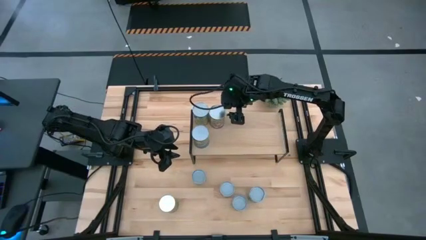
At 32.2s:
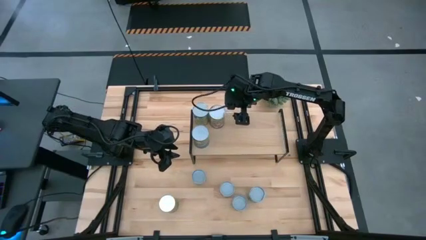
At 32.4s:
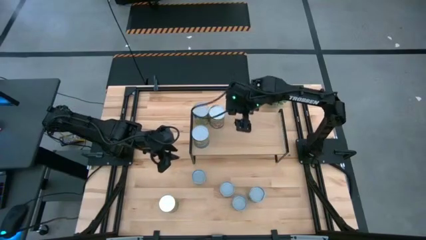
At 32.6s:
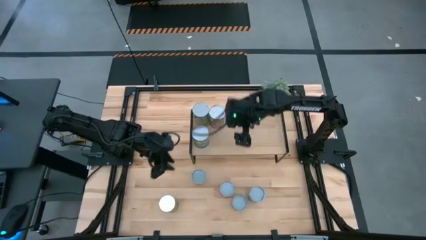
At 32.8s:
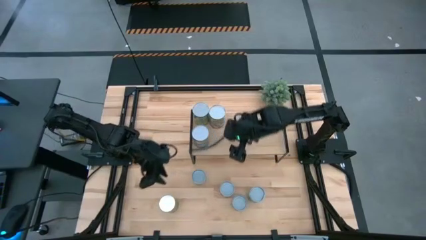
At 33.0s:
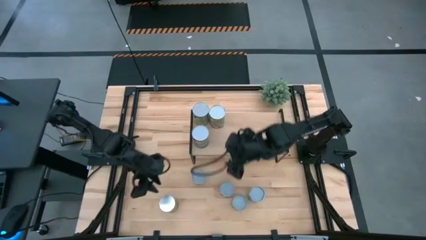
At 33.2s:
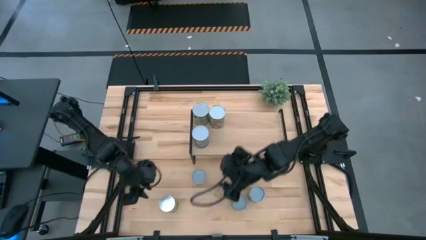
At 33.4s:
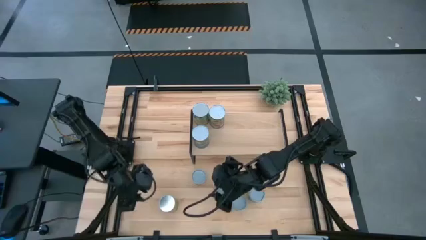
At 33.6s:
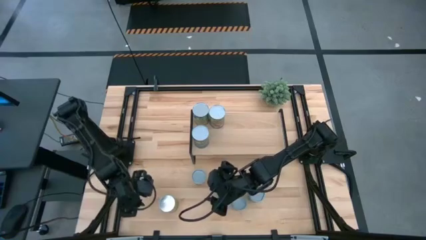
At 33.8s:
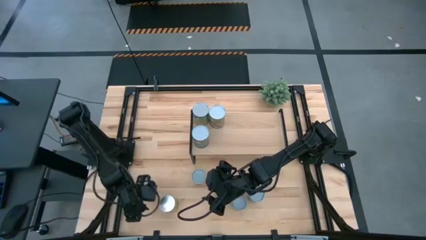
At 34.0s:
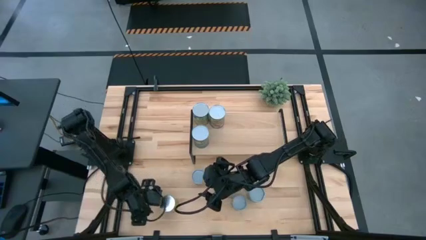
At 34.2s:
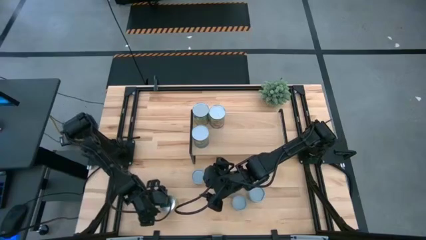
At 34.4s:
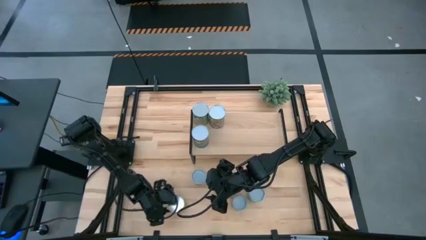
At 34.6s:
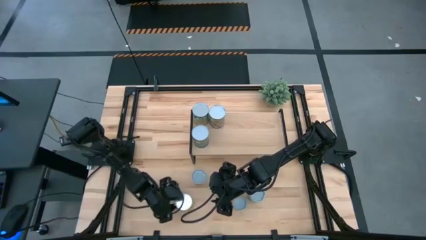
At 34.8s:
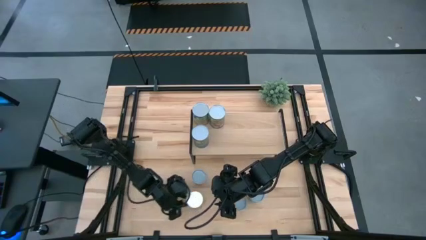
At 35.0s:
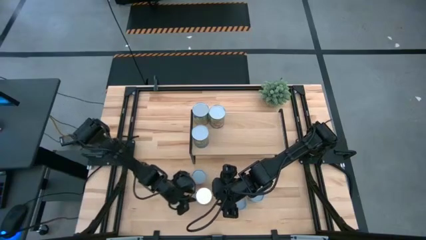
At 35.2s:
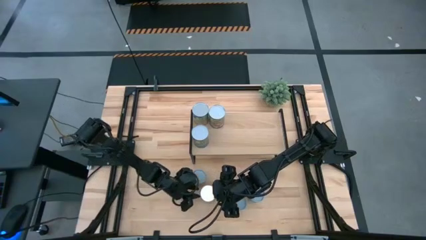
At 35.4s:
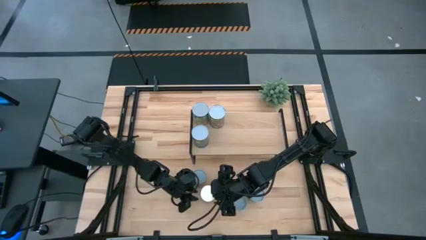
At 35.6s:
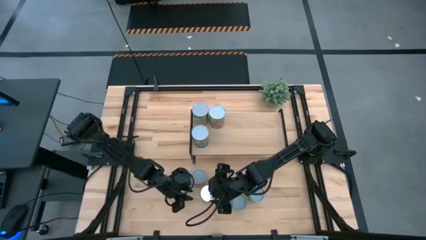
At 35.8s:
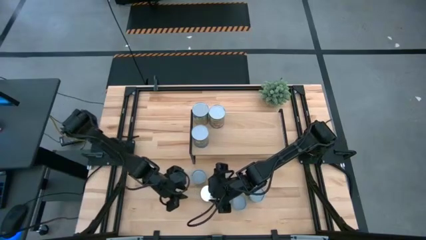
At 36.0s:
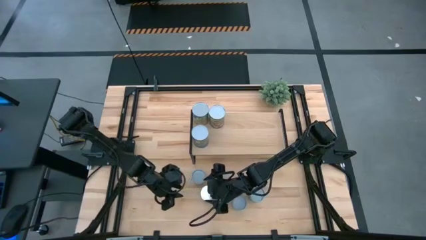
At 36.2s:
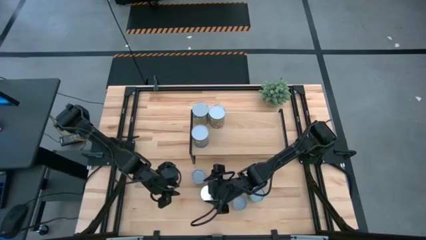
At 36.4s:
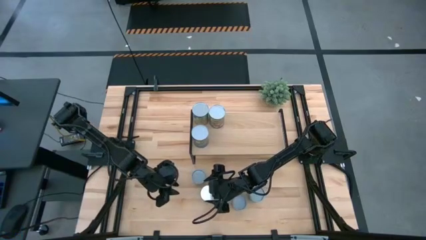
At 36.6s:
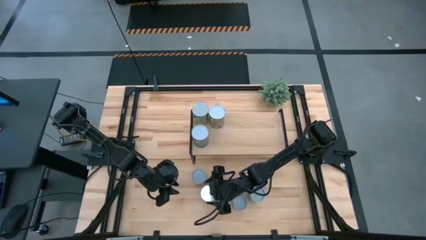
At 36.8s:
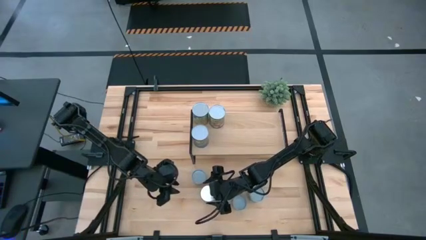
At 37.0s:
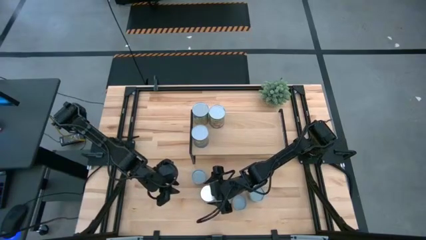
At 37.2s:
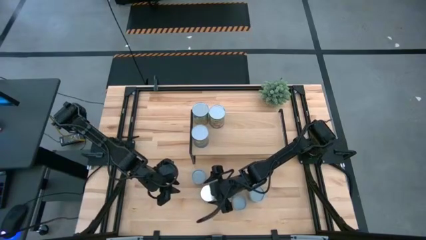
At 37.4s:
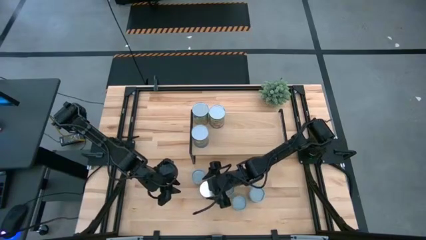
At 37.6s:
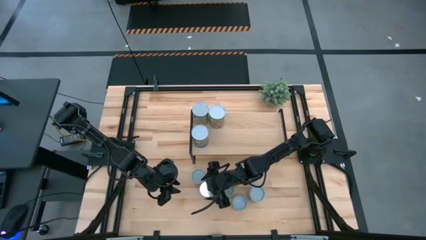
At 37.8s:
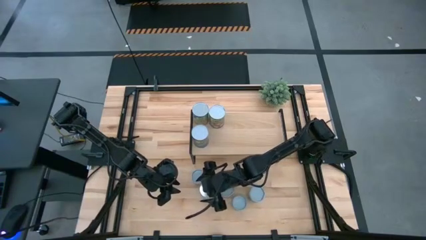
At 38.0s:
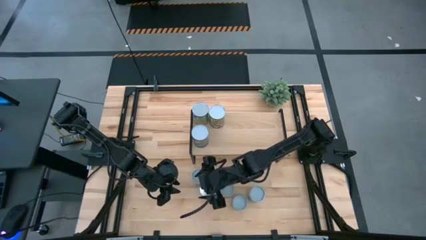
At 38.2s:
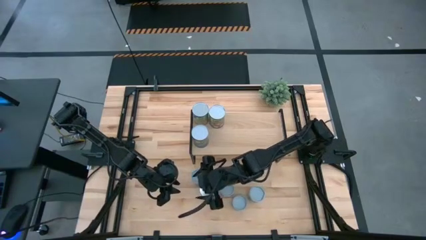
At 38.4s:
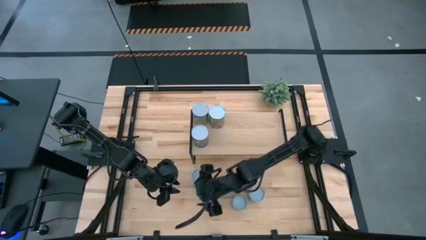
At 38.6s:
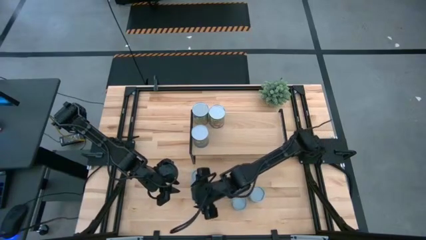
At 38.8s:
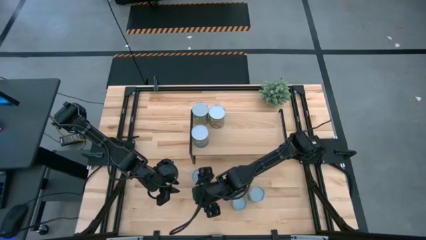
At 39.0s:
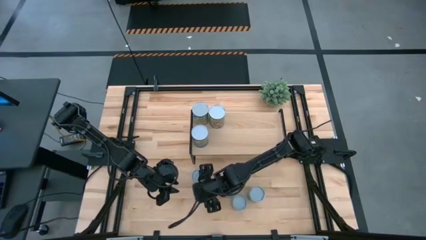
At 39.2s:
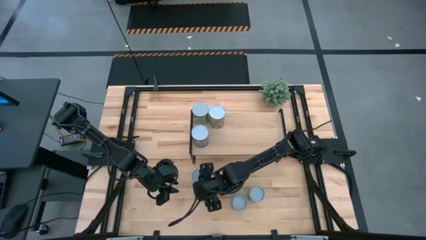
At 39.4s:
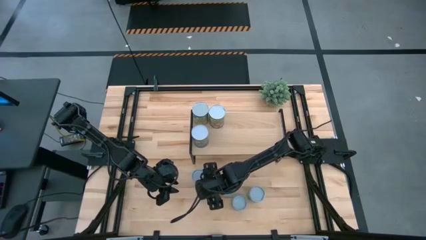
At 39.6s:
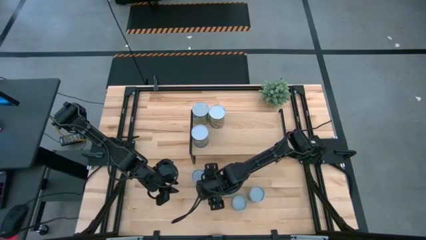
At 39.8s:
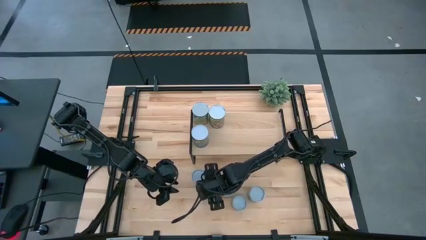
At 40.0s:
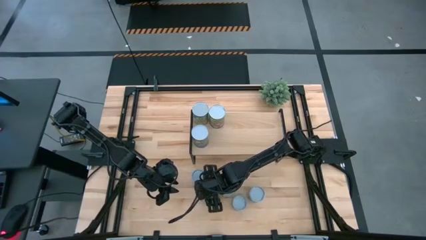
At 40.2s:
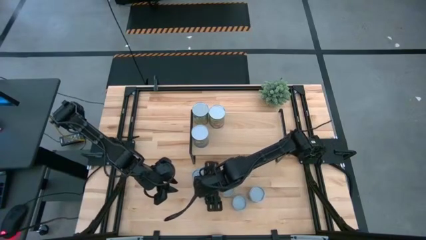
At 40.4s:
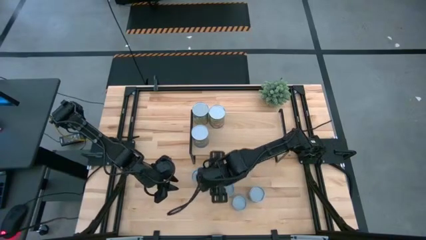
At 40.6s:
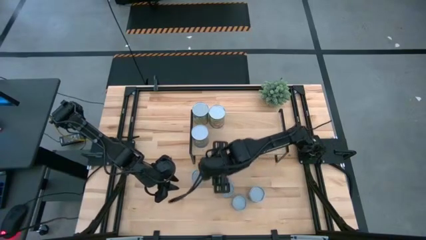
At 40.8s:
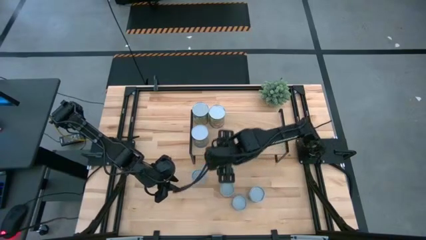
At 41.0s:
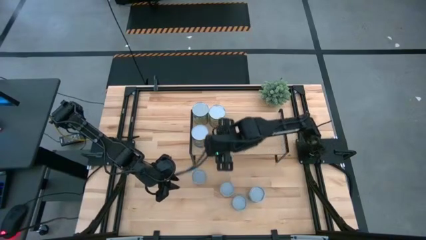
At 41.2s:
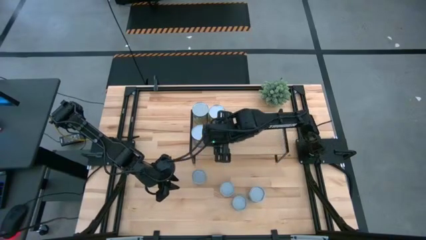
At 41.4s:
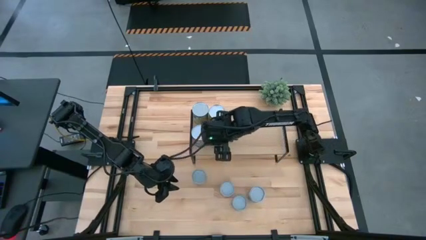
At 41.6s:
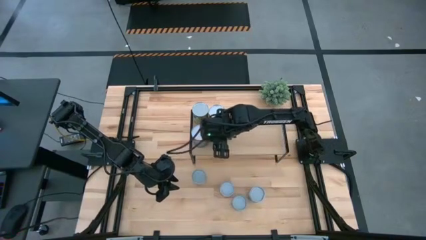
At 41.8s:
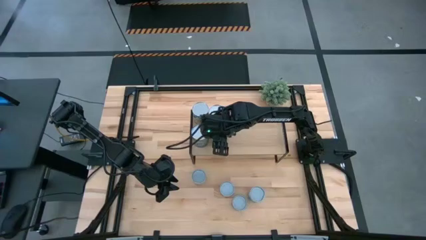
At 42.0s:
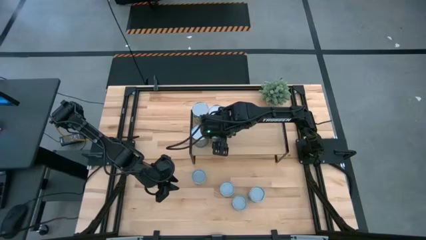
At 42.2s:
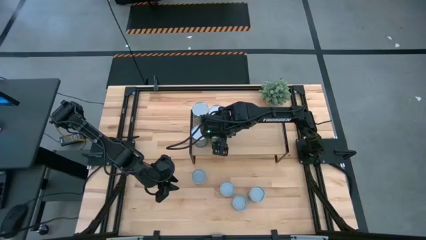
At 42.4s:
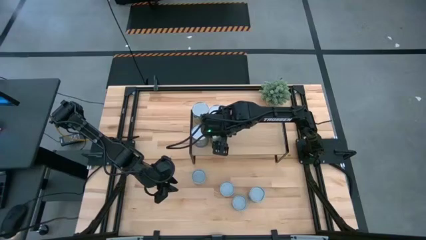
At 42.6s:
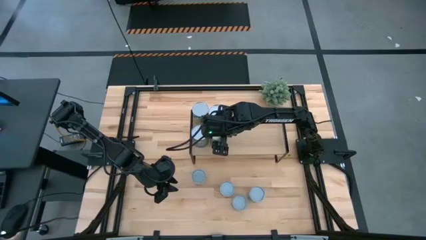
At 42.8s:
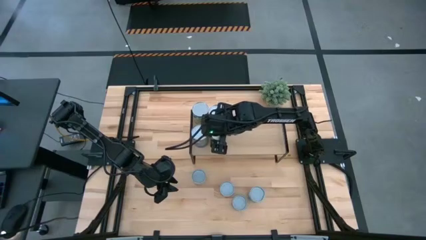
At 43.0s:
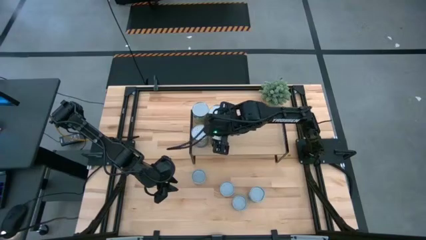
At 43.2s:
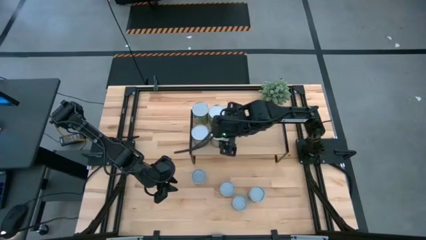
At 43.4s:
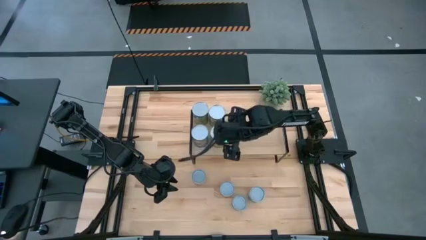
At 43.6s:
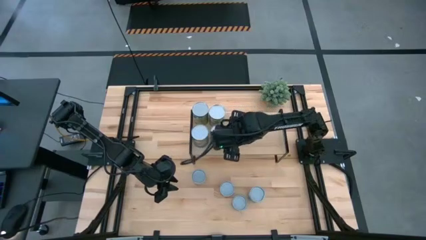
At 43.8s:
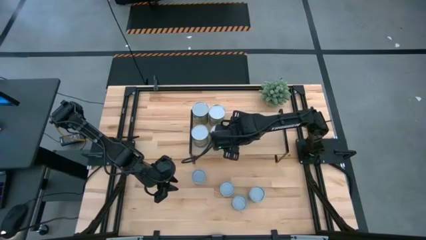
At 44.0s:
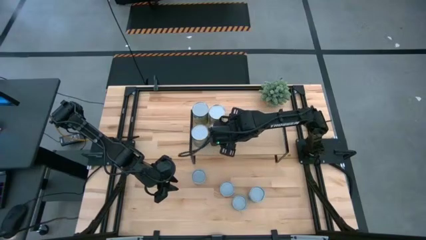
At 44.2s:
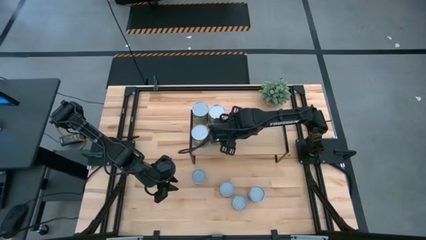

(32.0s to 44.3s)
Task: Pick and place cans onto a shelf
Put the canned oranges on the shelf

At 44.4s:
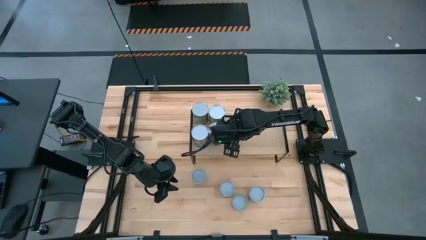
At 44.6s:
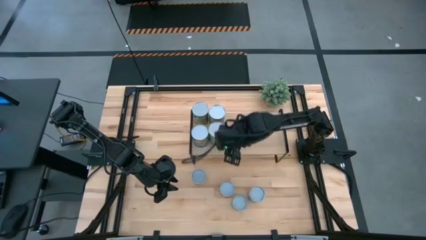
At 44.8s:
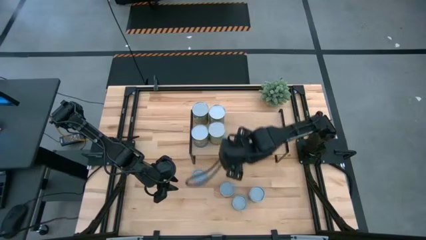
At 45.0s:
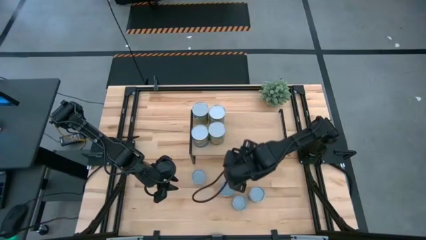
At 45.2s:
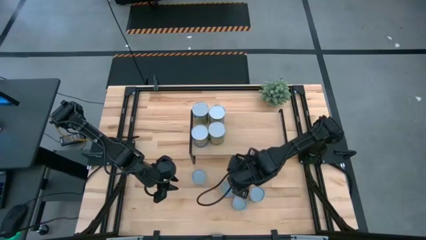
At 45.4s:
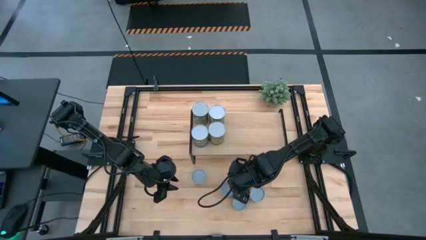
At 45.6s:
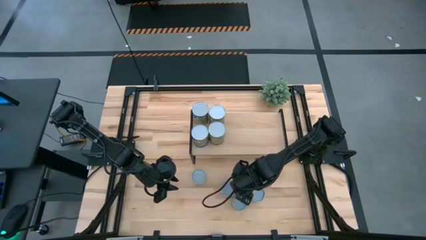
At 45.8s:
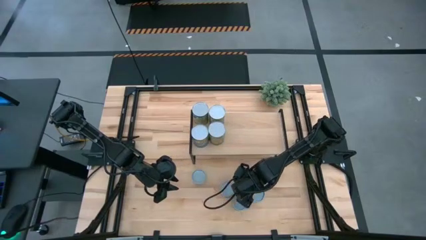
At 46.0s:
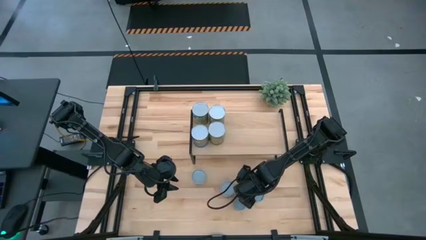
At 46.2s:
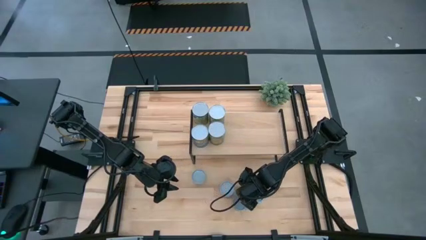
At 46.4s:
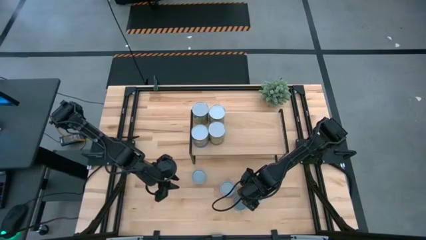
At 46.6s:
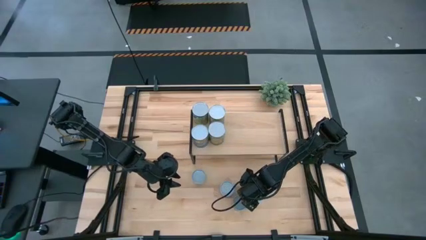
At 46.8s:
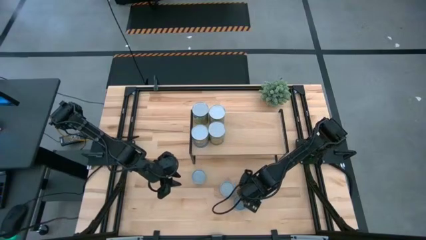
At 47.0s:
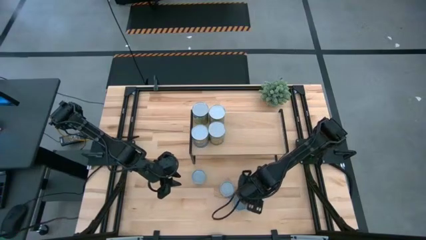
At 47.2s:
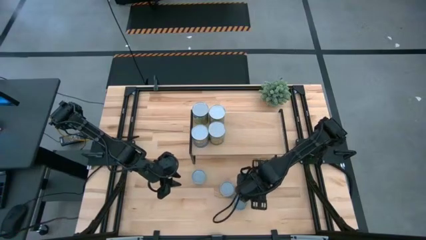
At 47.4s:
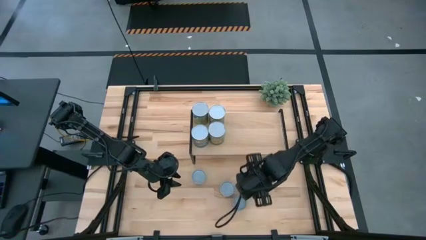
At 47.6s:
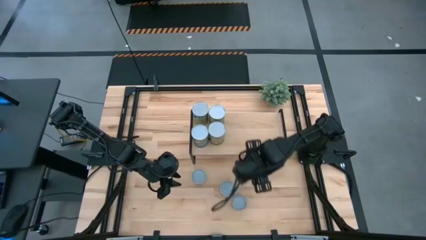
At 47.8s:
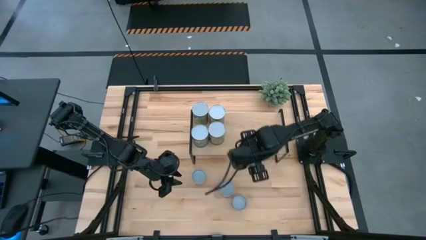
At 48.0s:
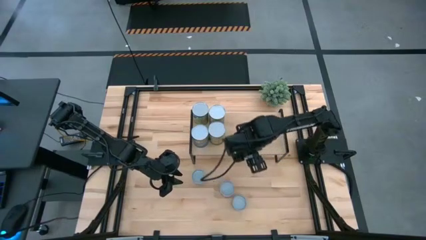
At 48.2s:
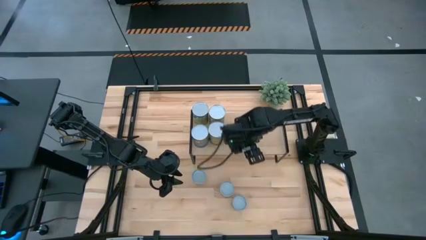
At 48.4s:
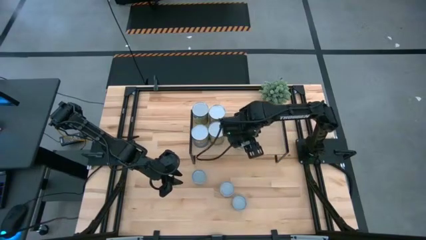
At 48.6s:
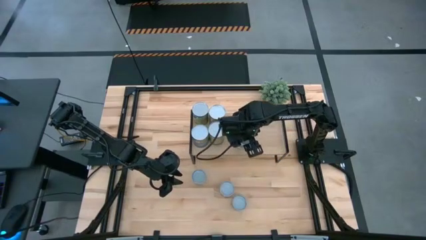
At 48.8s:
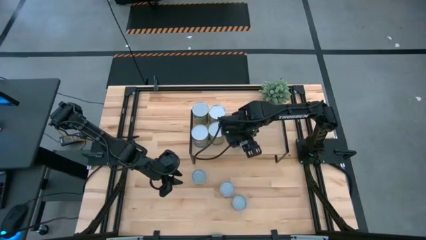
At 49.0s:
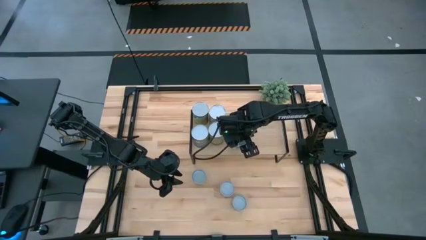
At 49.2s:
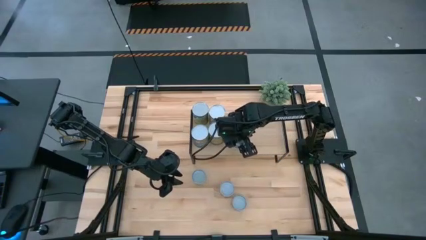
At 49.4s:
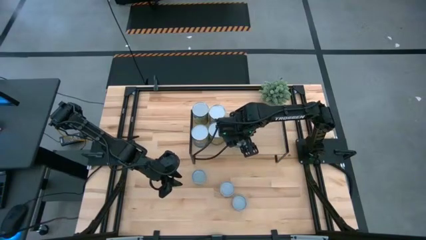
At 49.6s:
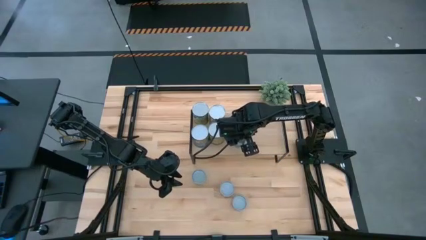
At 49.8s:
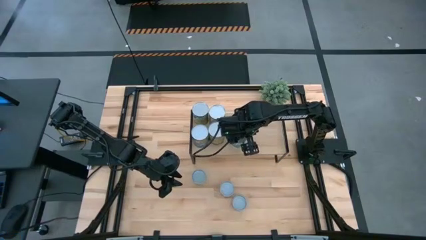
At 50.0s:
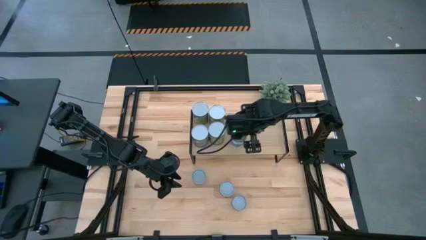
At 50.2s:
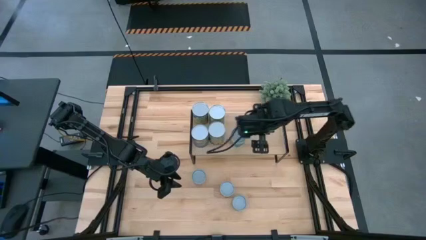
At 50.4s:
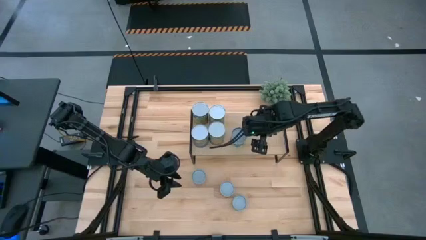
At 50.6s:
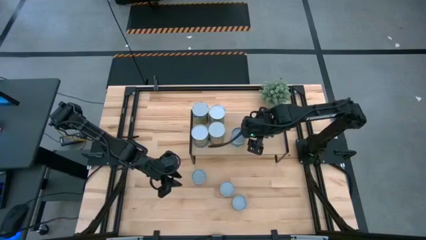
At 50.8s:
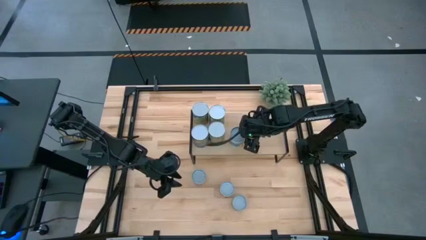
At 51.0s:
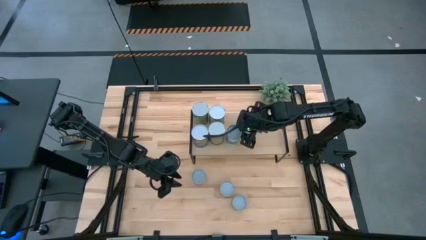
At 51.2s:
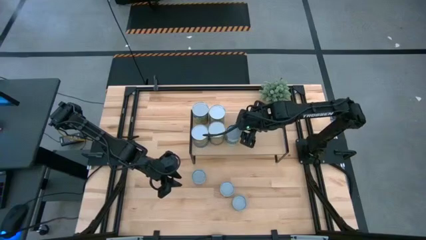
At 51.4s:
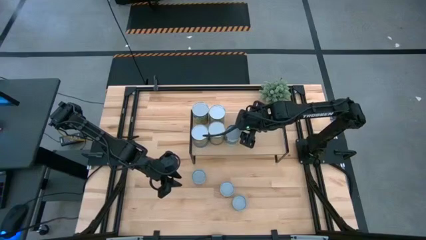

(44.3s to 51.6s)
Put the canned mixed vegetables on the shelf
